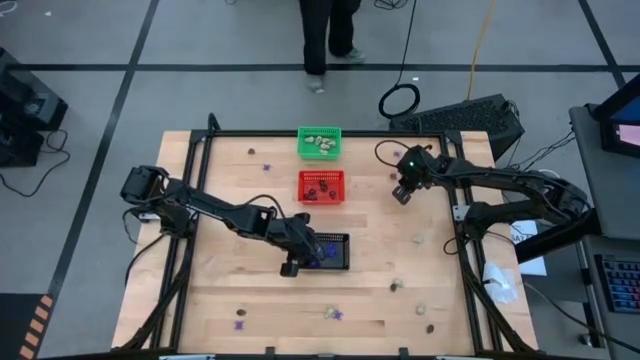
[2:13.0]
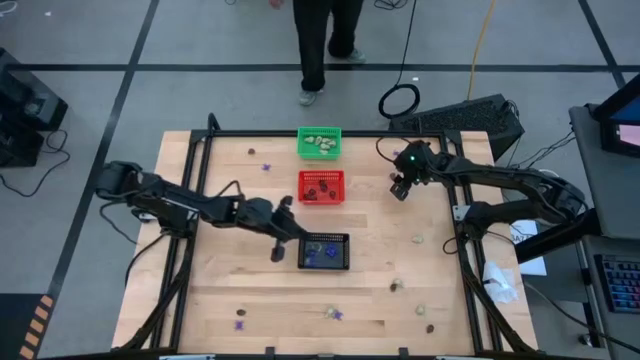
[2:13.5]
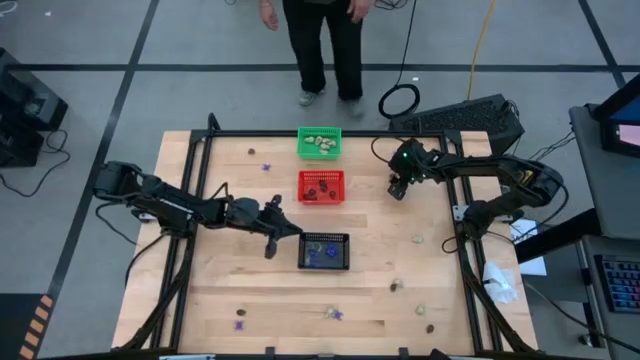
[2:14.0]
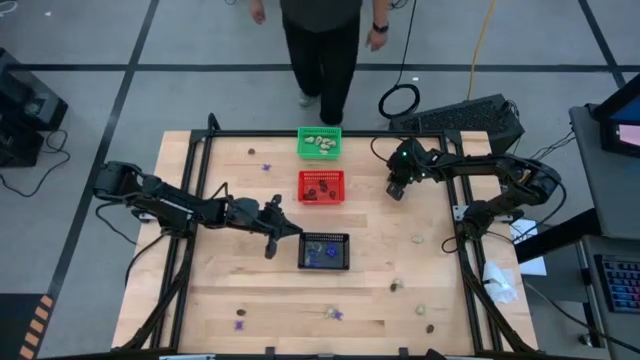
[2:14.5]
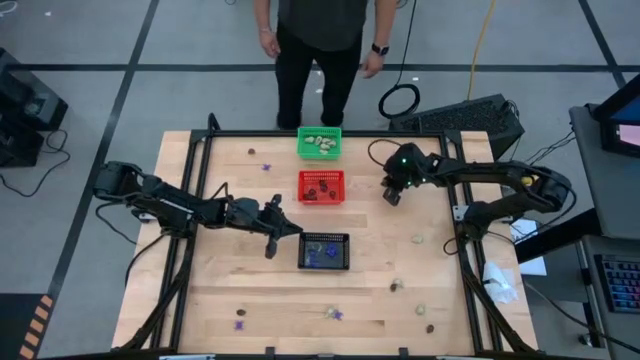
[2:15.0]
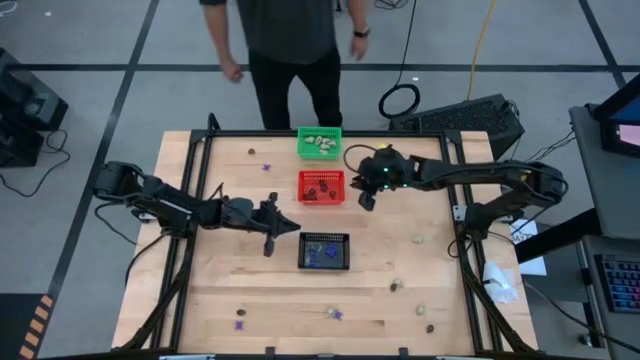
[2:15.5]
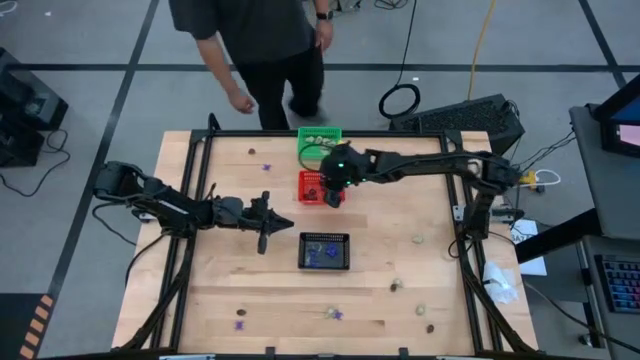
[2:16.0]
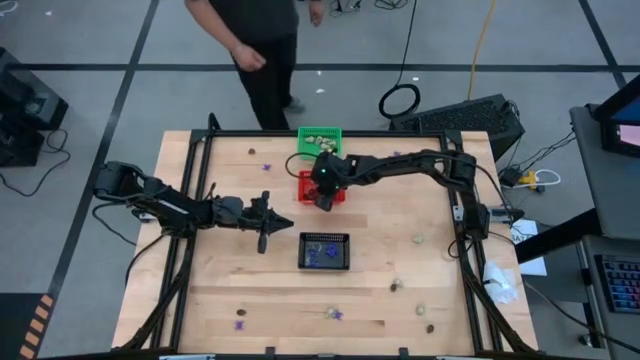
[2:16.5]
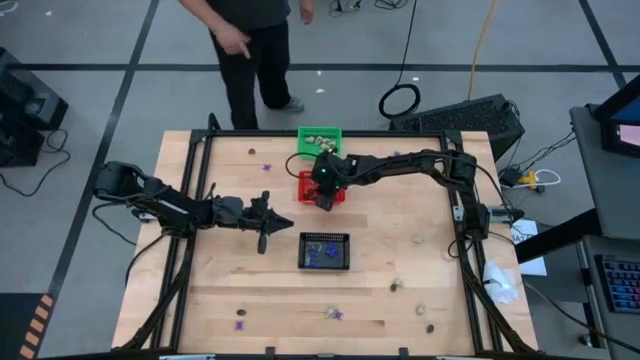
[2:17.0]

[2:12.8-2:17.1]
Task: Sort Halloween decoration
Put the black skull toy into the red basket

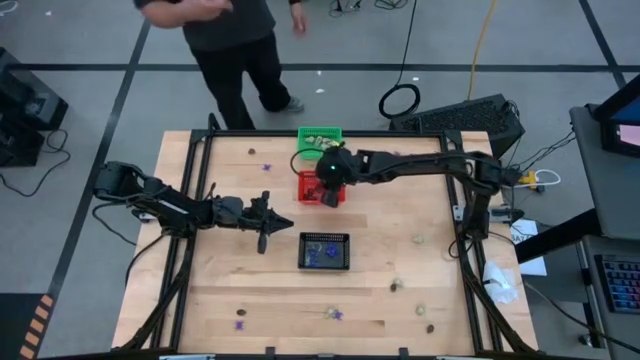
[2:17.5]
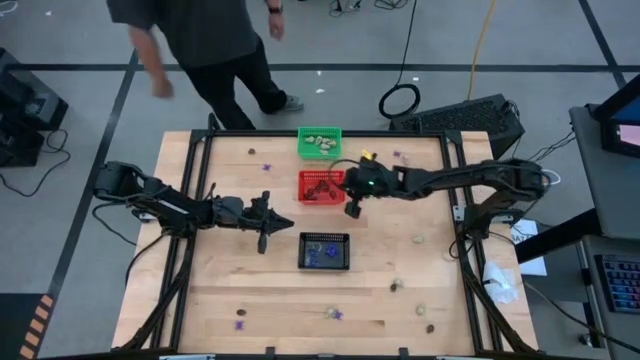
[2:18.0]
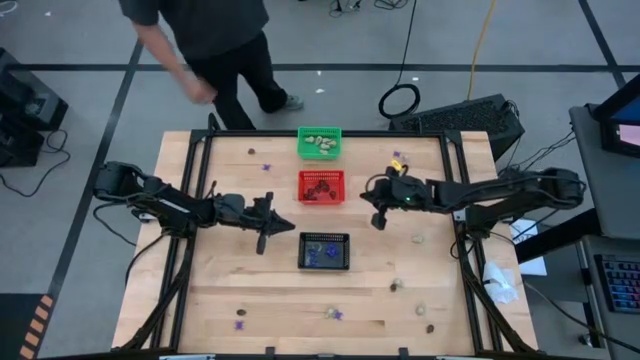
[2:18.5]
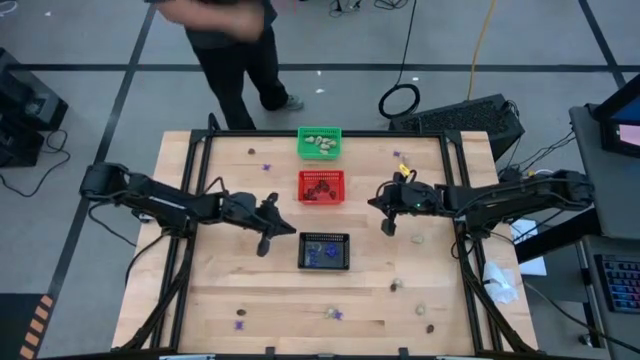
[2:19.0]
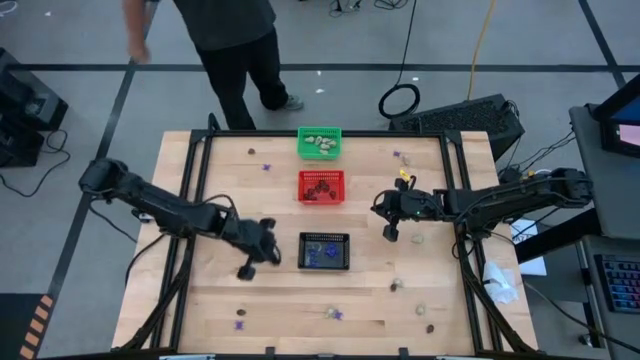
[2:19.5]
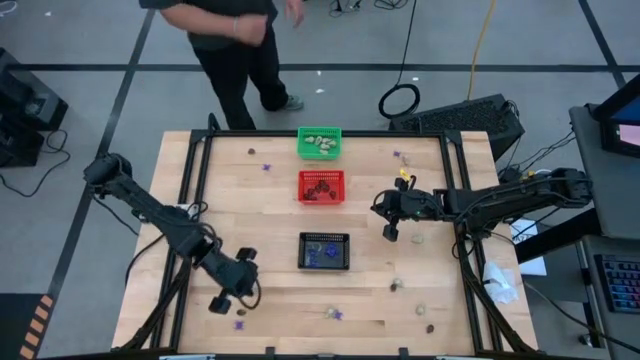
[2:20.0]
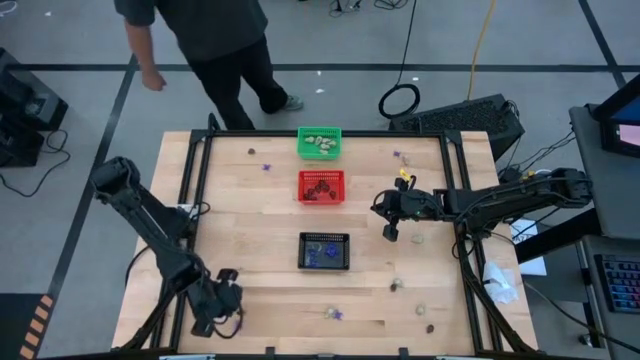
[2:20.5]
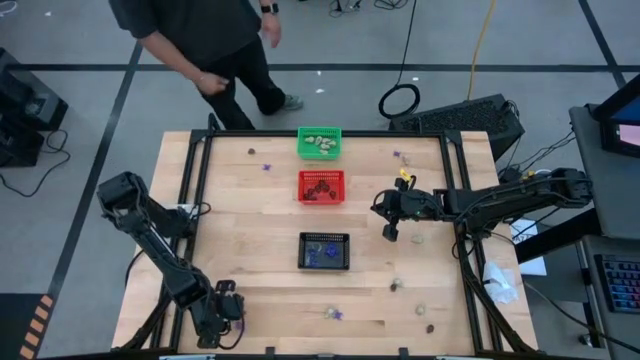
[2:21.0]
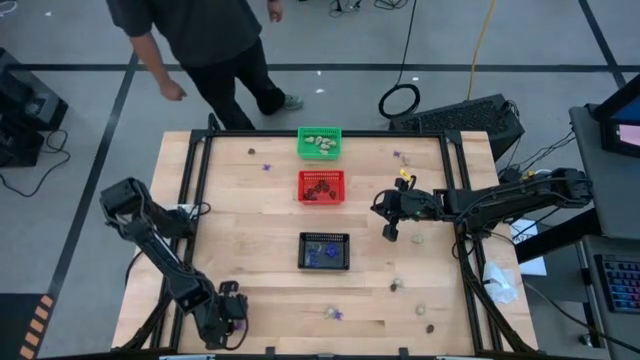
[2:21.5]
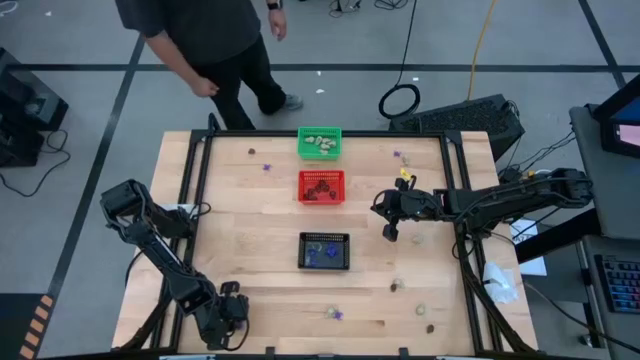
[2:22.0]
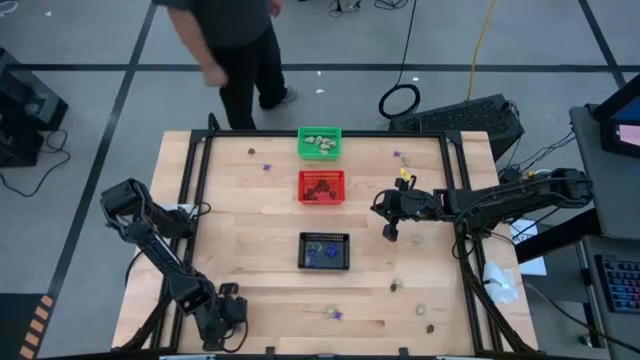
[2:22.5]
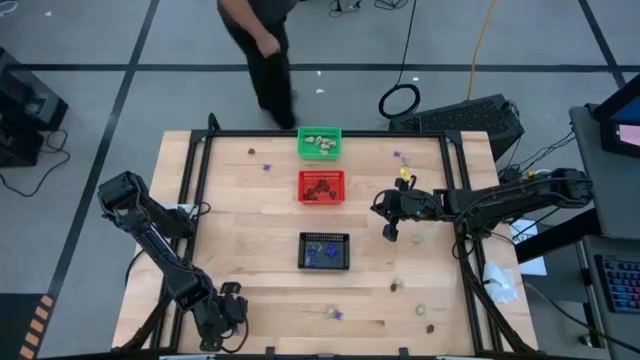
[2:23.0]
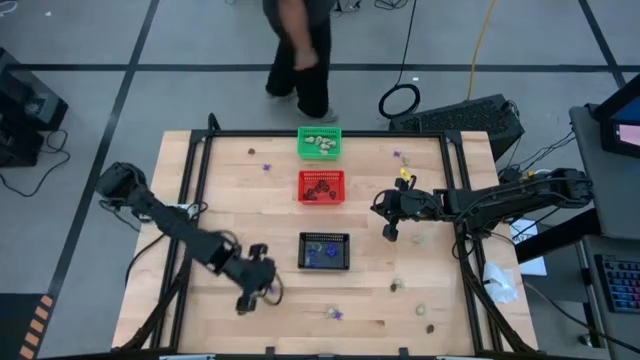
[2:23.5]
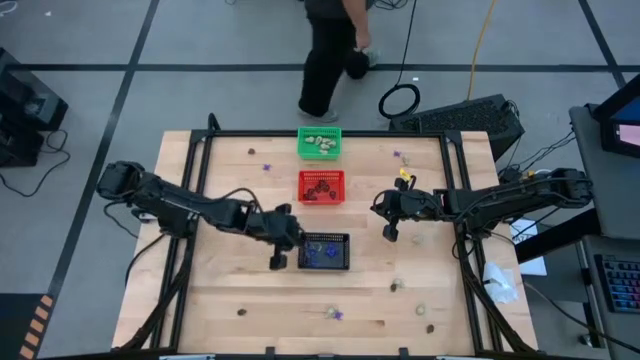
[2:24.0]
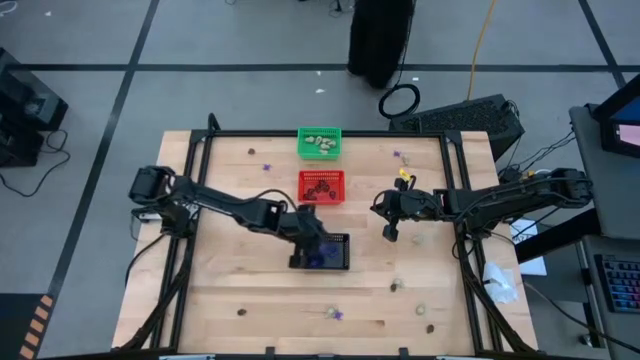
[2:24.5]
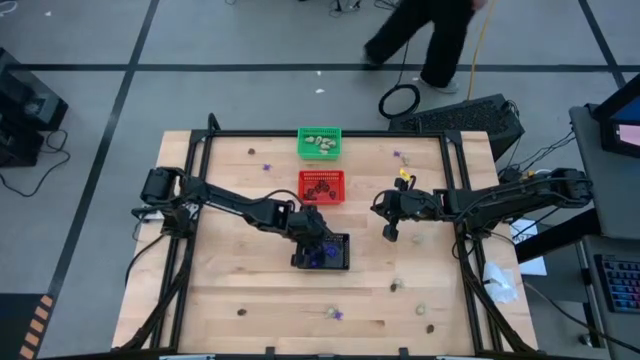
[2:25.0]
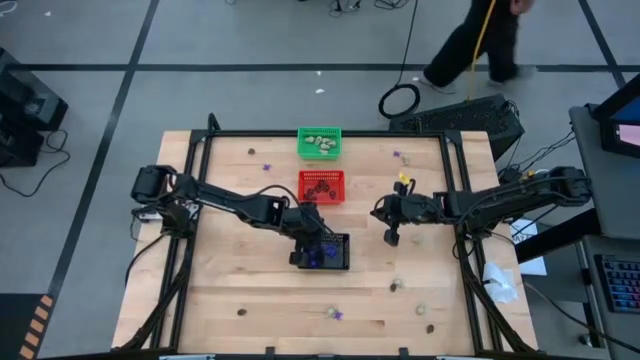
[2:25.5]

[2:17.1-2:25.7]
Put the violet spider toy into the black basket

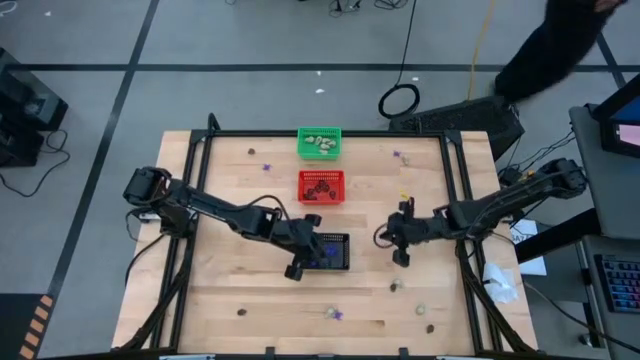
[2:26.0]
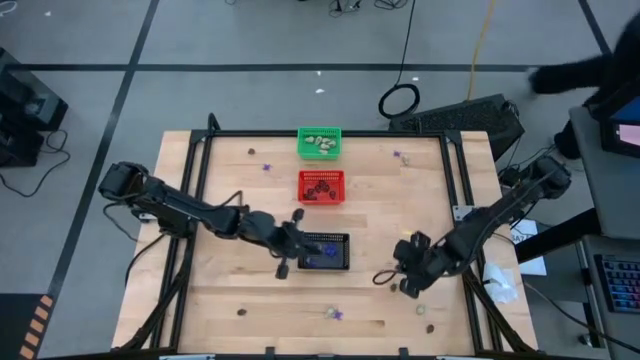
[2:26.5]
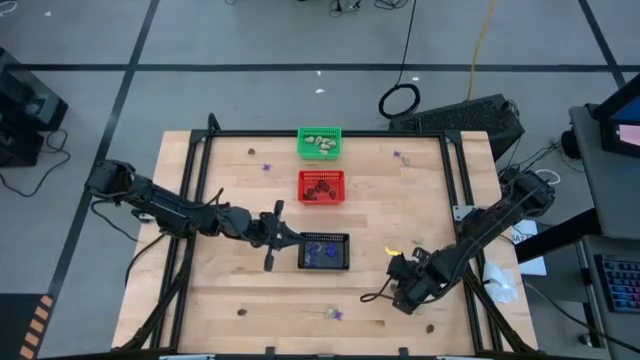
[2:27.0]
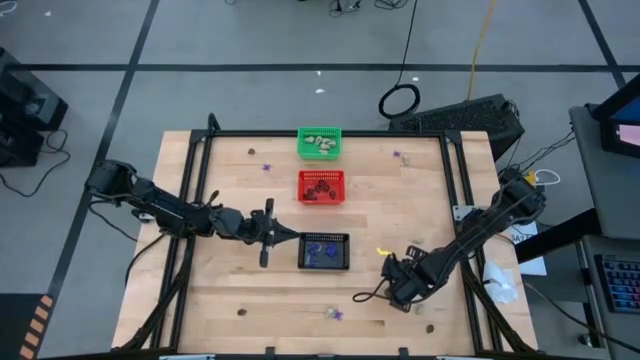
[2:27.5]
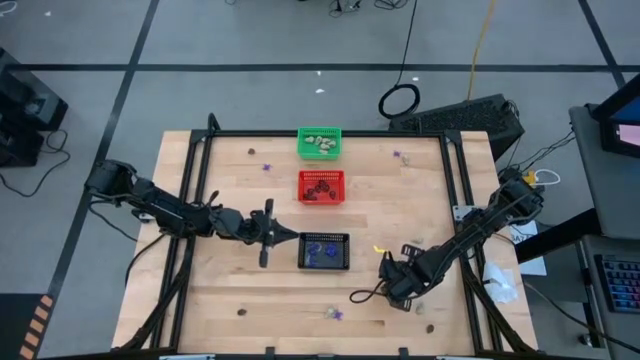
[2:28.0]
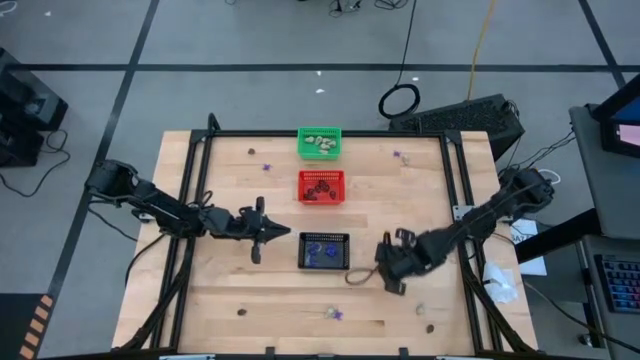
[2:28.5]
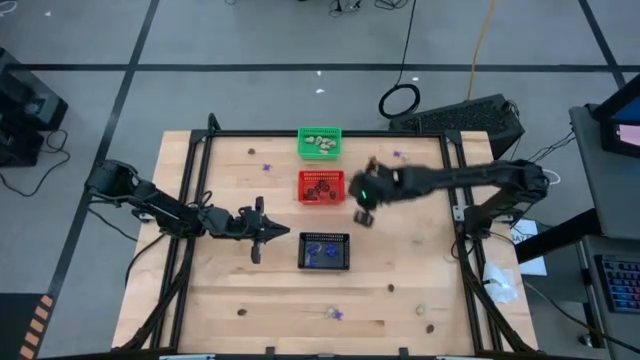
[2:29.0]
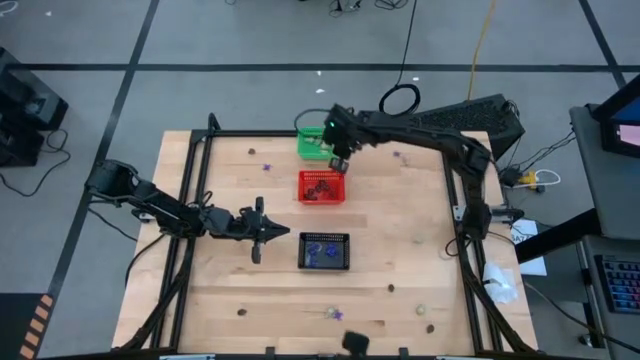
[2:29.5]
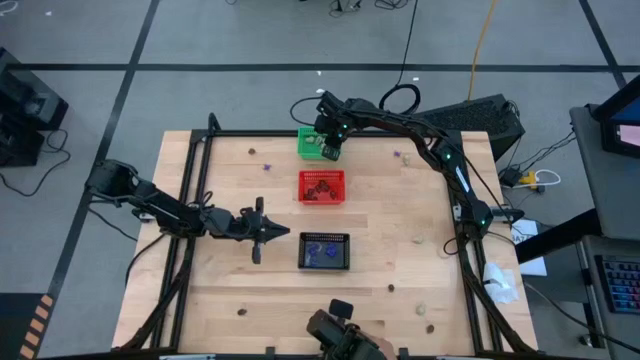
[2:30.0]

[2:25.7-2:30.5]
Put the white skull toy into the green basket

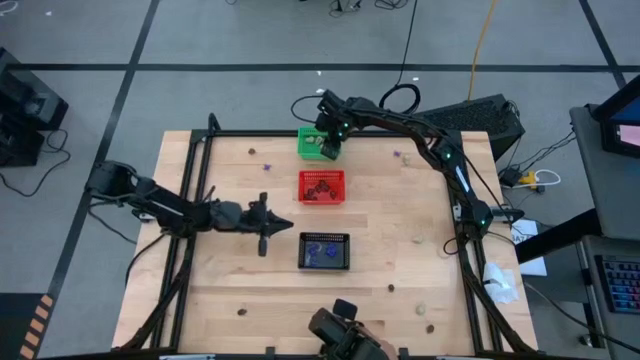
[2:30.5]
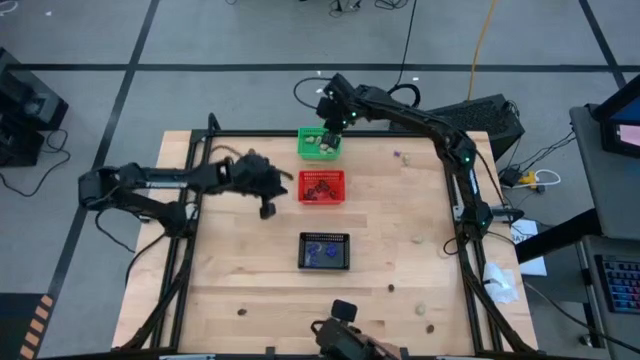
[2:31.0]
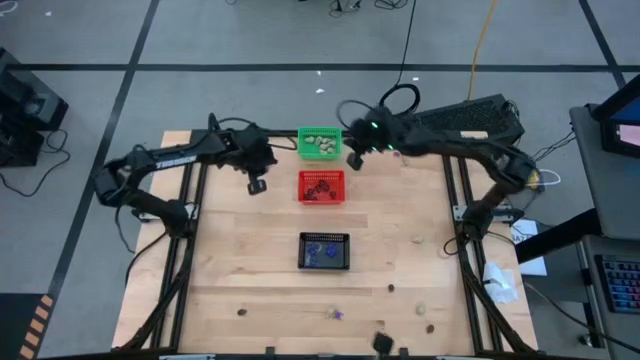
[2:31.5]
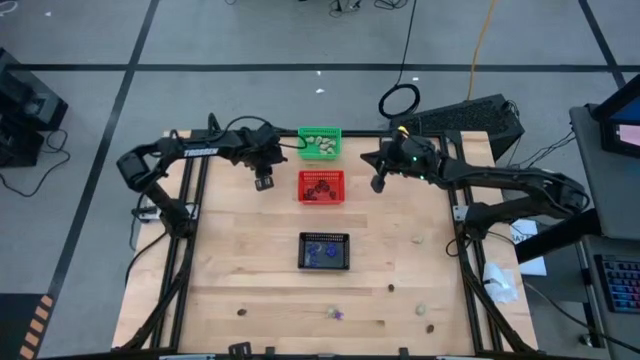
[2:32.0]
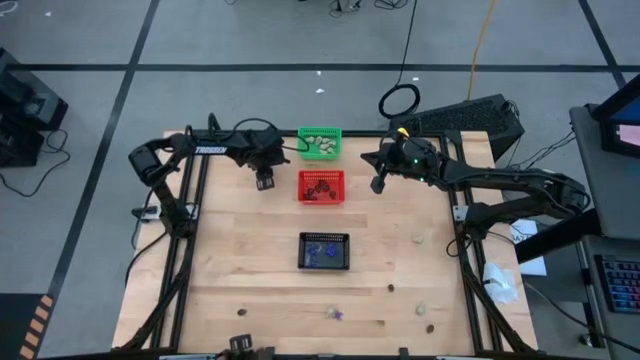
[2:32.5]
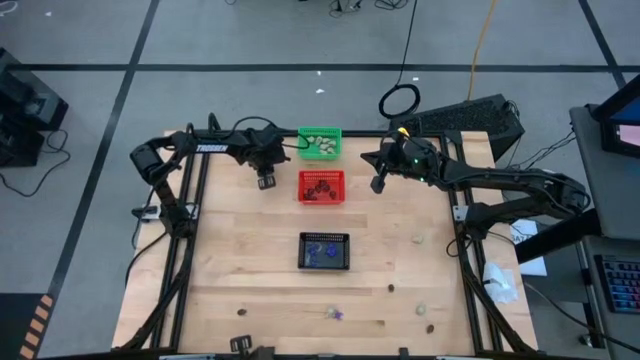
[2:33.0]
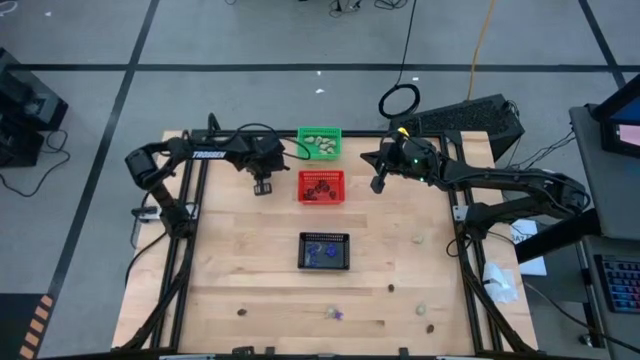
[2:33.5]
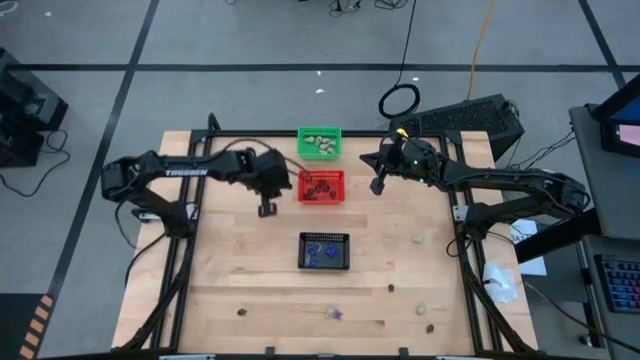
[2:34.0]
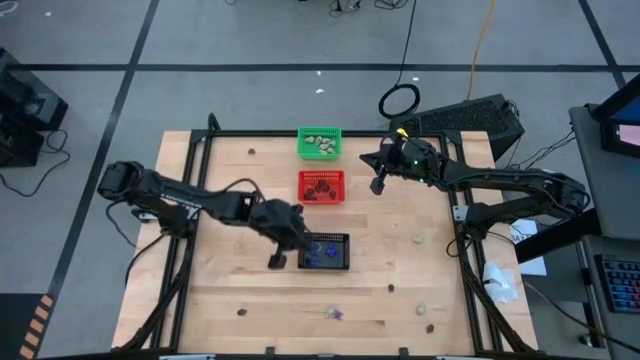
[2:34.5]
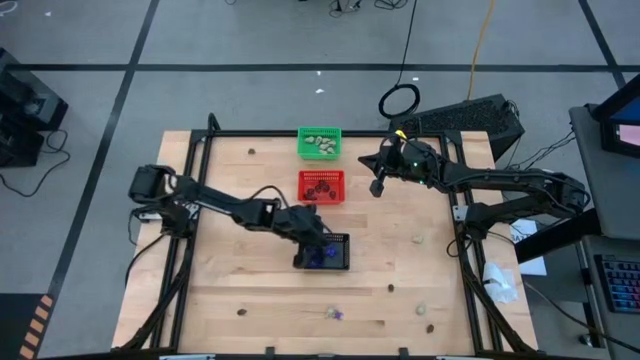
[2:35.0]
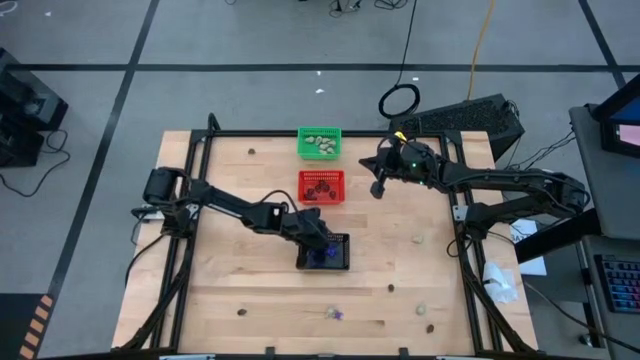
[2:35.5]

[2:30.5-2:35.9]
Put the violet spider toy into the black basket
